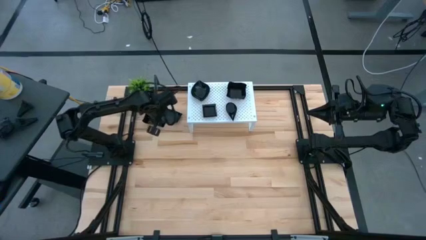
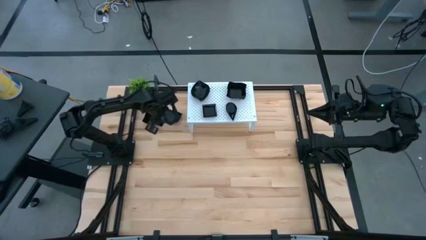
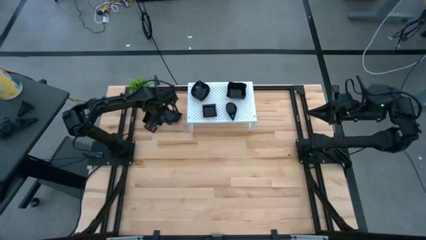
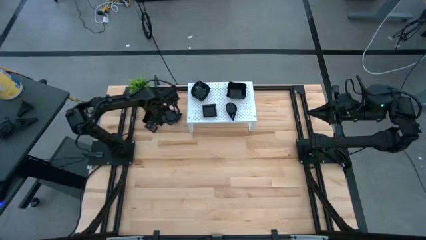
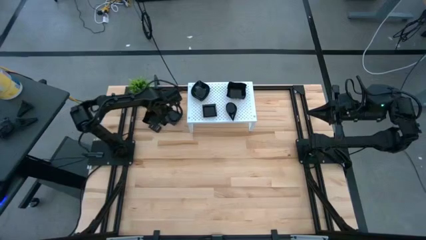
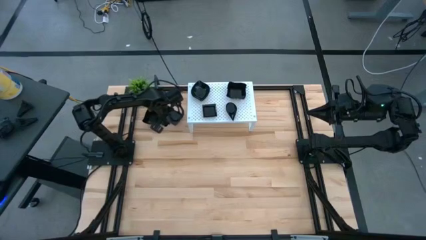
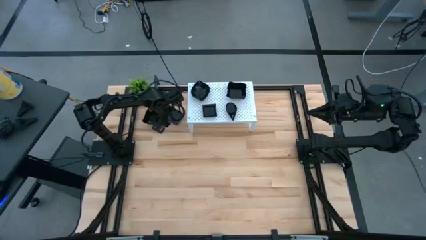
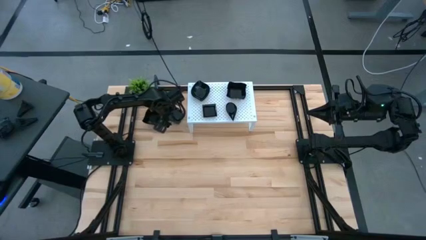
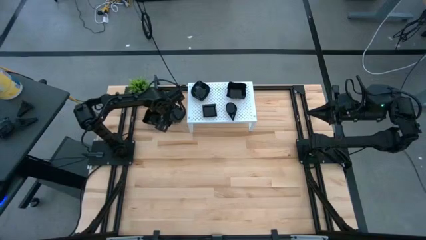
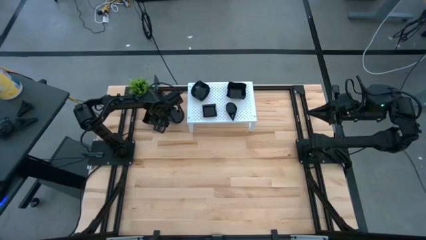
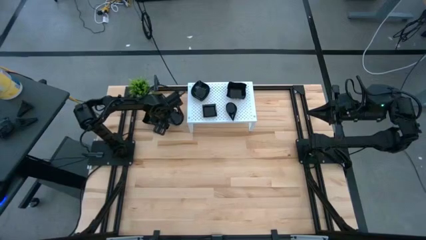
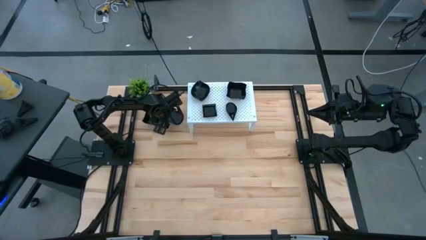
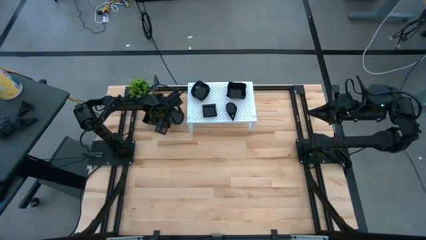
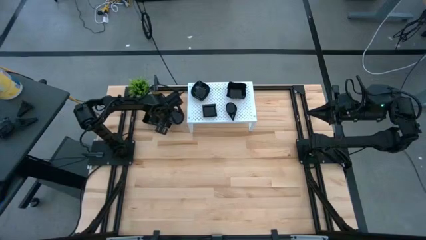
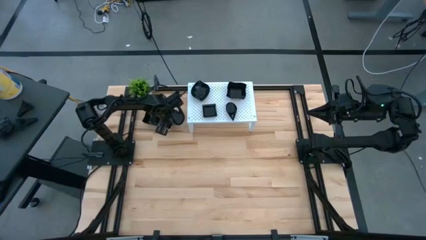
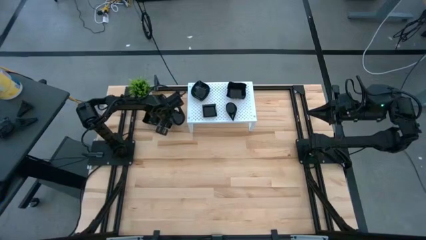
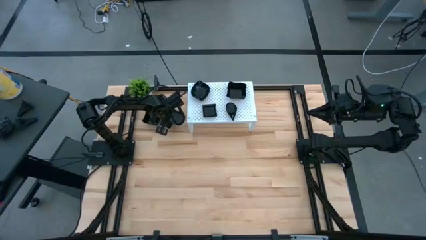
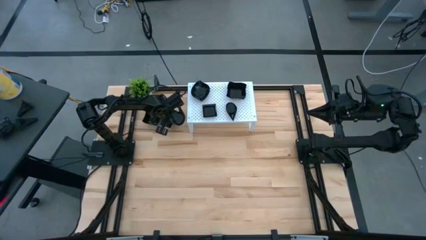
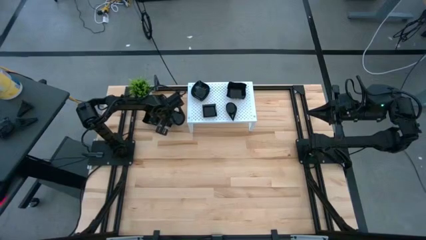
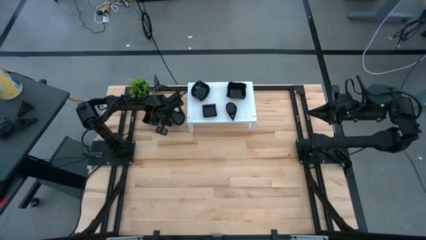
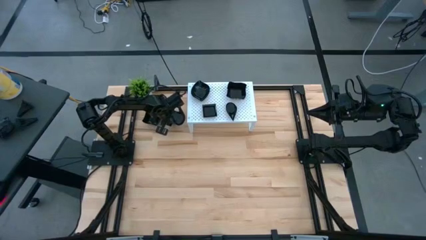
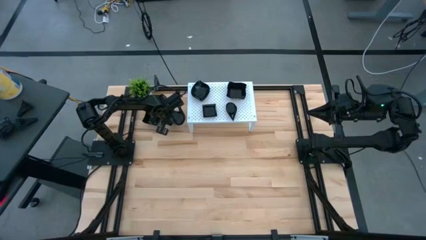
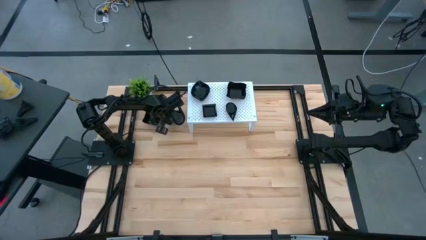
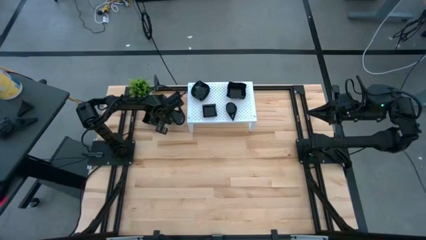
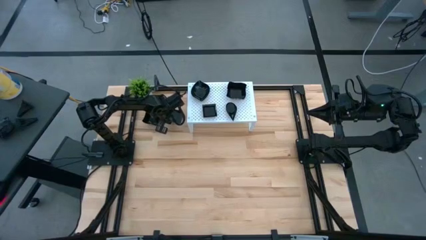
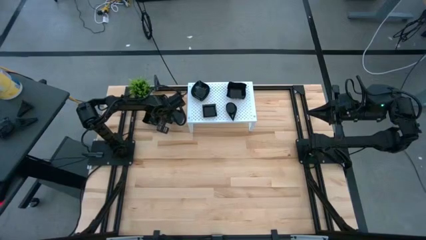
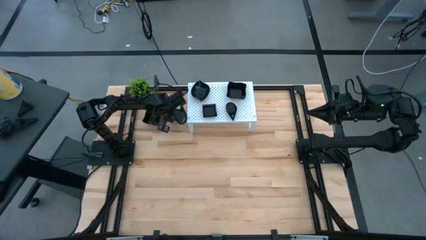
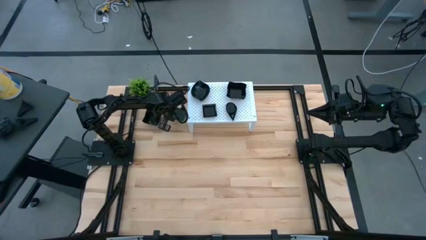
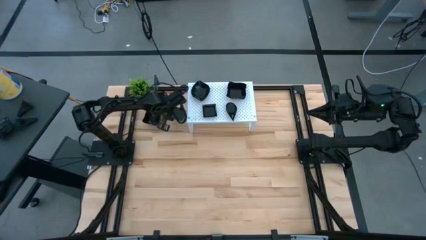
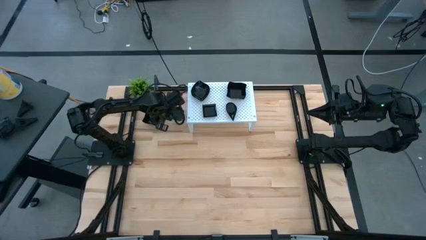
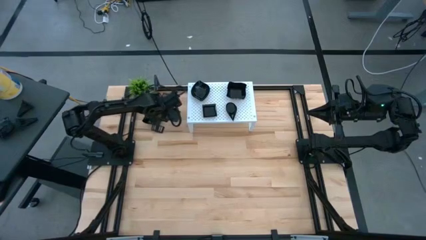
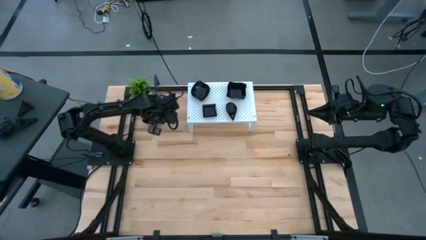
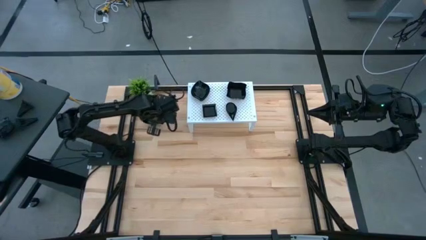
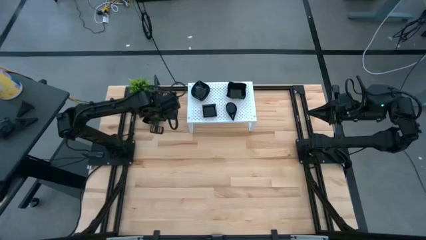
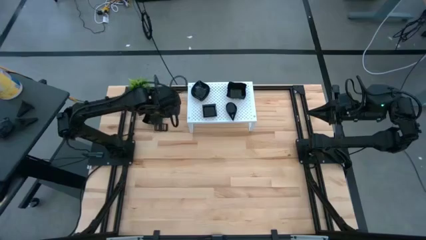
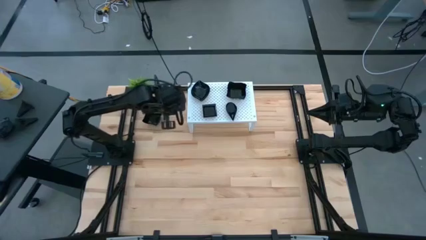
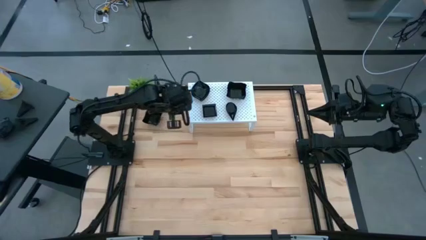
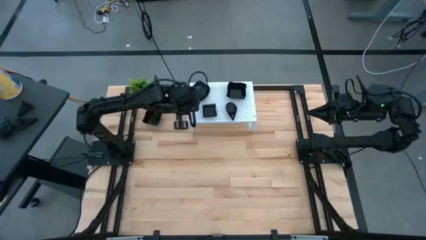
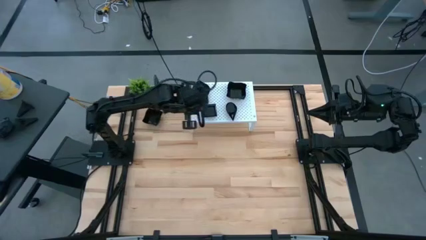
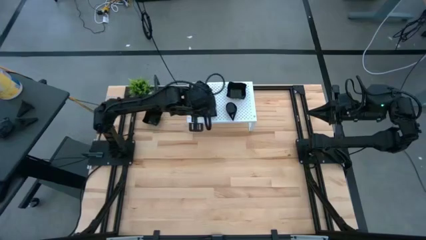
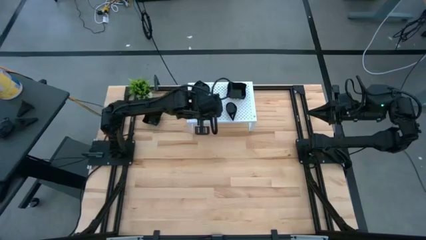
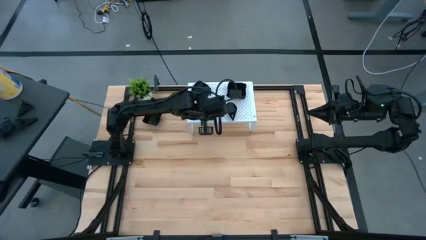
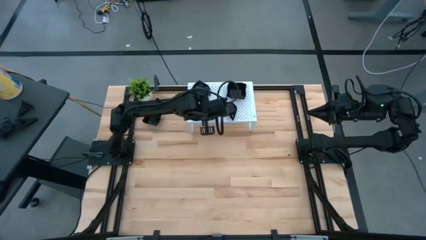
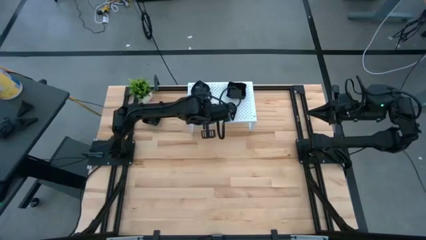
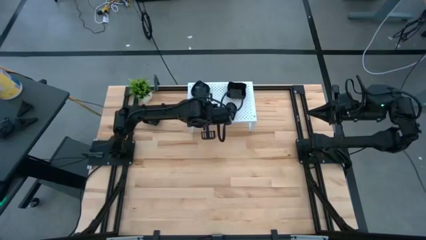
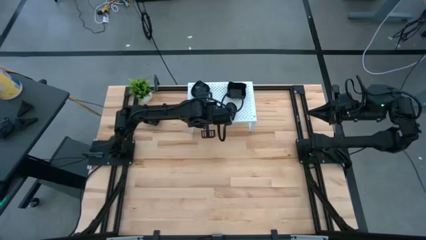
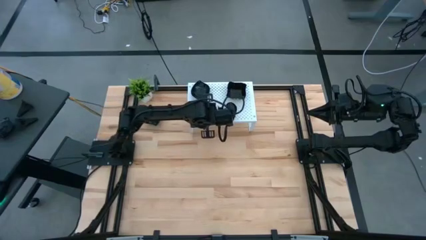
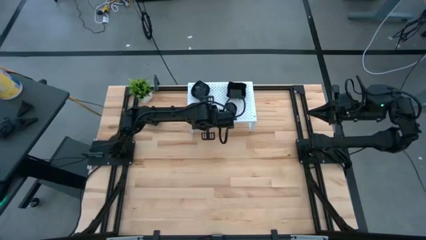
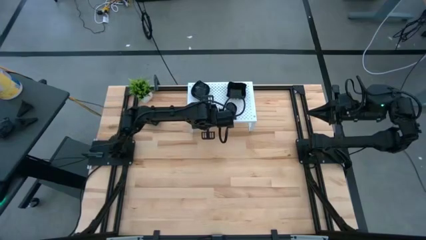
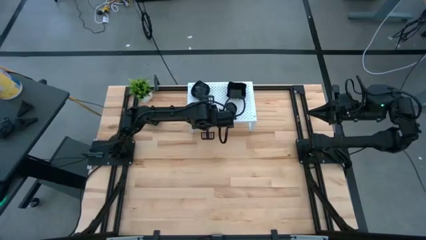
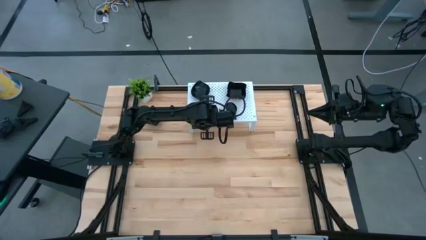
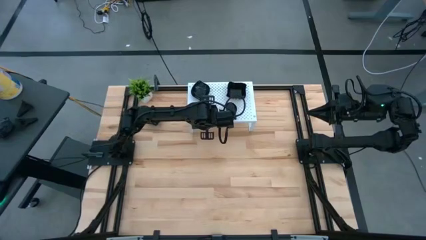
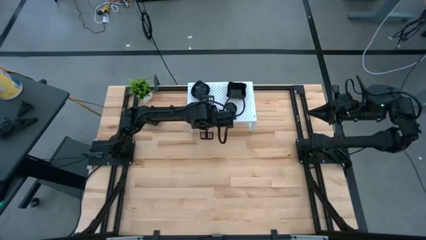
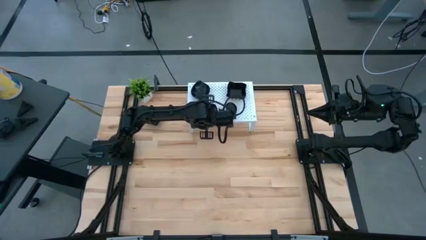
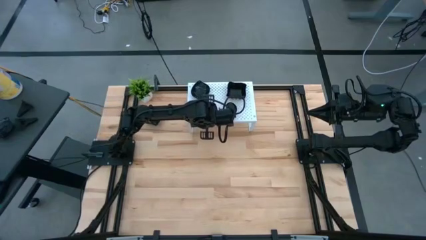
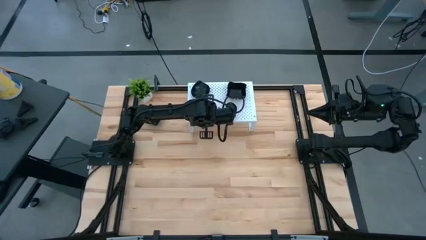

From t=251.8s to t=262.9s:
Task: Pick & Place Mini shaped plates
Stack the square plate on top of the square plate on the shelf
